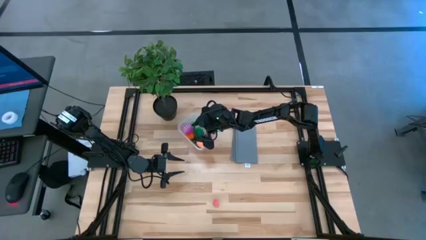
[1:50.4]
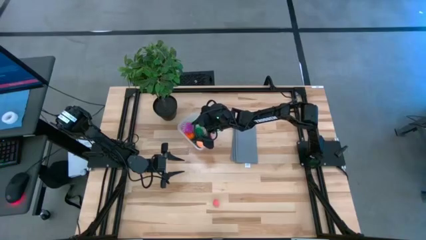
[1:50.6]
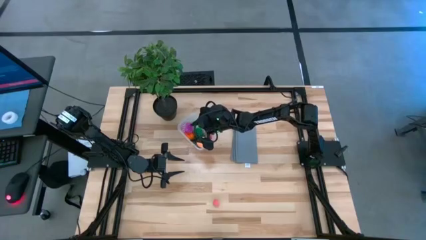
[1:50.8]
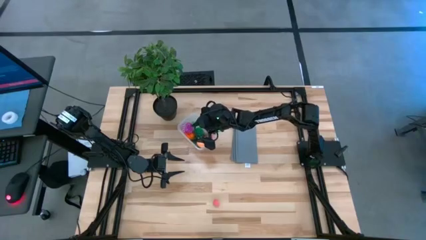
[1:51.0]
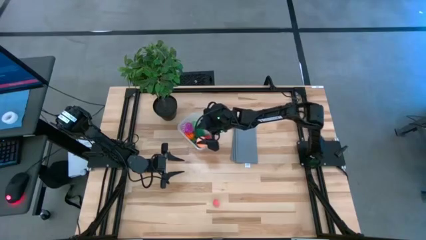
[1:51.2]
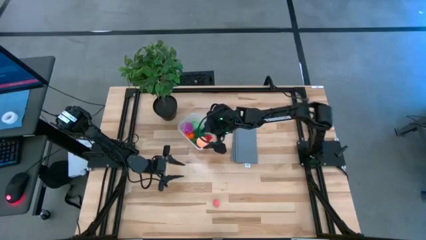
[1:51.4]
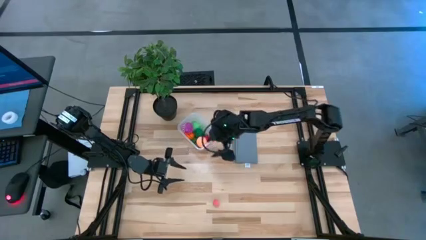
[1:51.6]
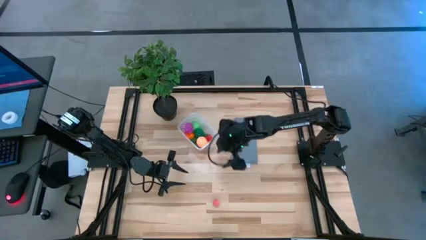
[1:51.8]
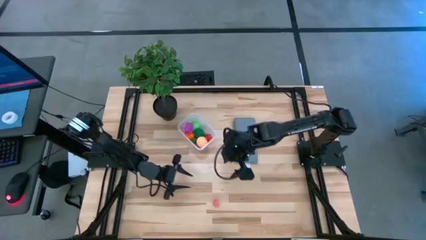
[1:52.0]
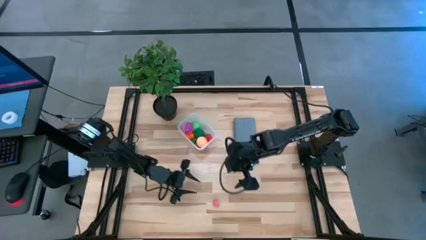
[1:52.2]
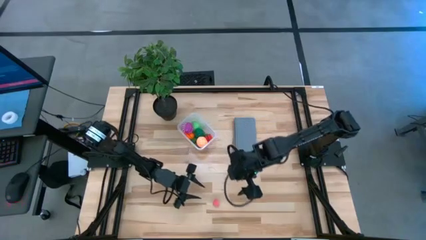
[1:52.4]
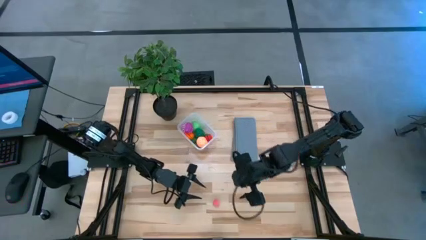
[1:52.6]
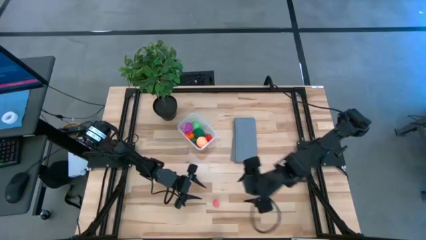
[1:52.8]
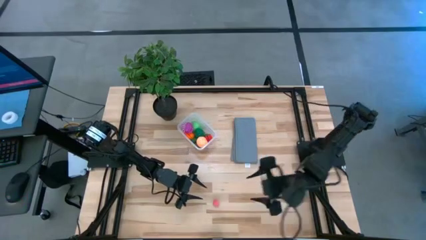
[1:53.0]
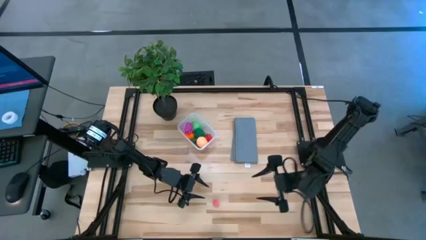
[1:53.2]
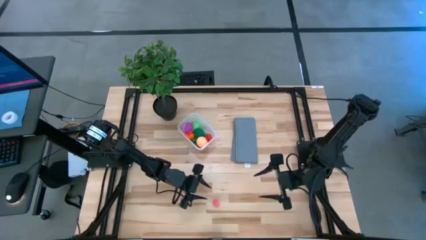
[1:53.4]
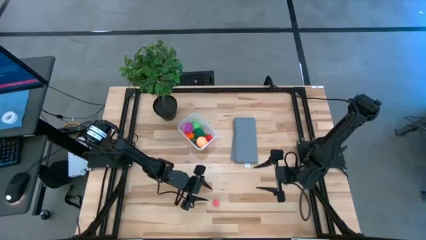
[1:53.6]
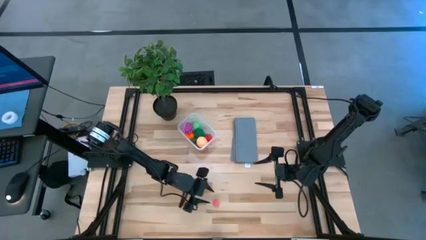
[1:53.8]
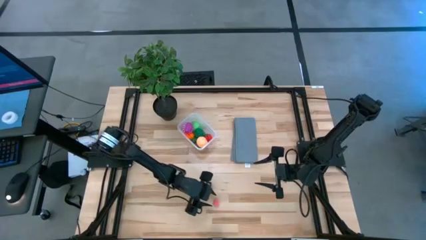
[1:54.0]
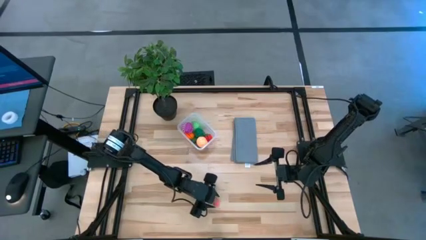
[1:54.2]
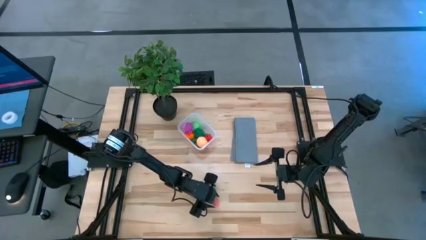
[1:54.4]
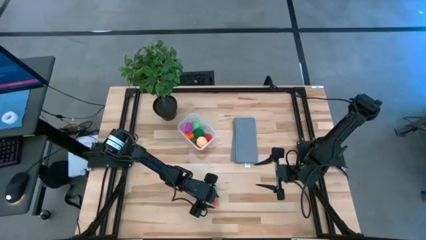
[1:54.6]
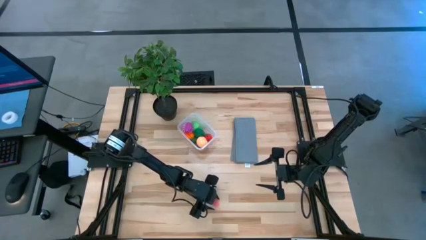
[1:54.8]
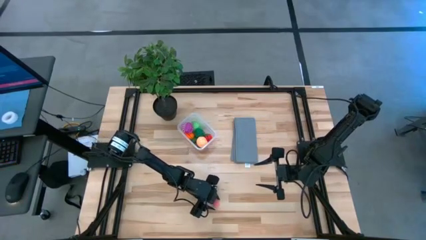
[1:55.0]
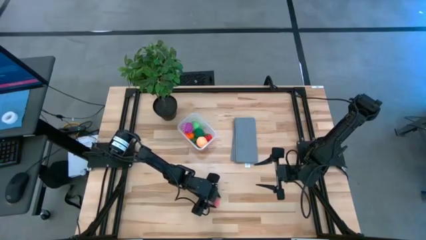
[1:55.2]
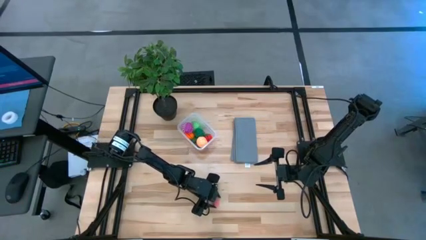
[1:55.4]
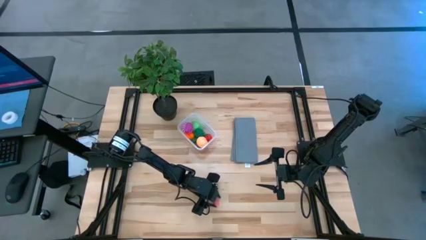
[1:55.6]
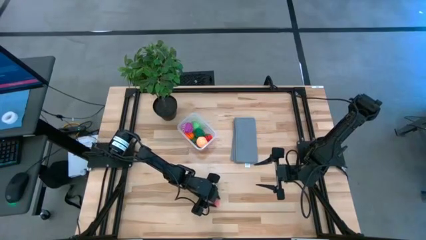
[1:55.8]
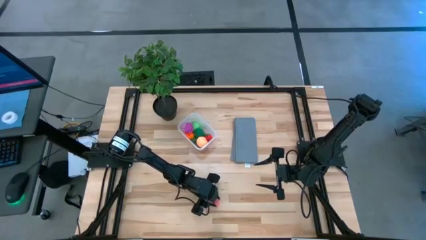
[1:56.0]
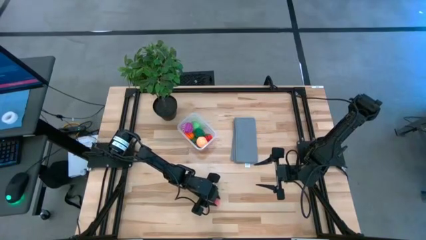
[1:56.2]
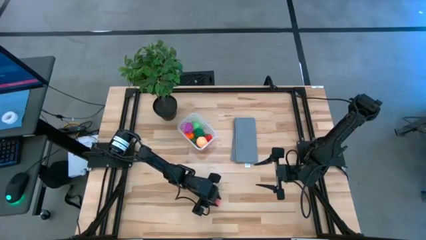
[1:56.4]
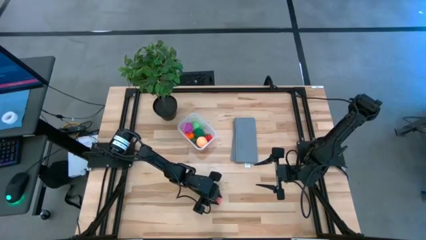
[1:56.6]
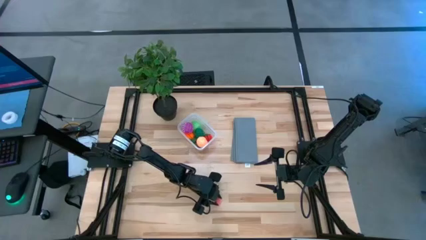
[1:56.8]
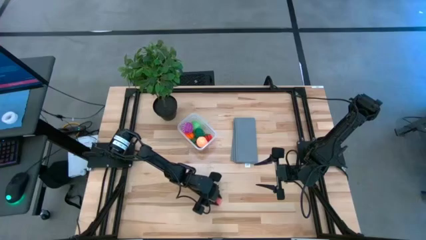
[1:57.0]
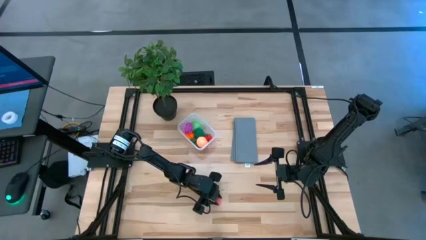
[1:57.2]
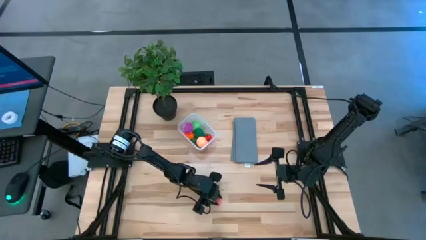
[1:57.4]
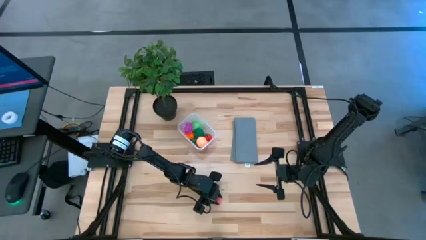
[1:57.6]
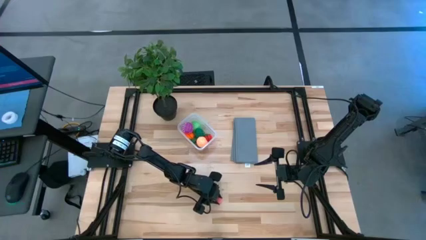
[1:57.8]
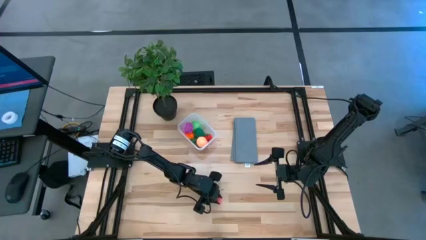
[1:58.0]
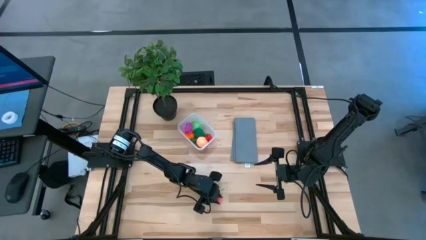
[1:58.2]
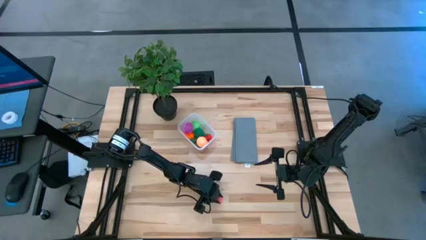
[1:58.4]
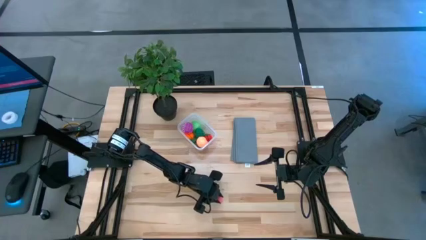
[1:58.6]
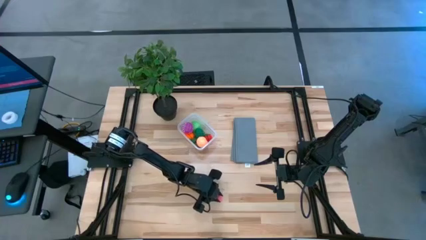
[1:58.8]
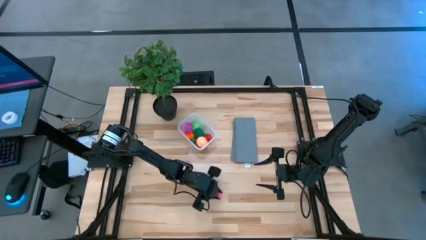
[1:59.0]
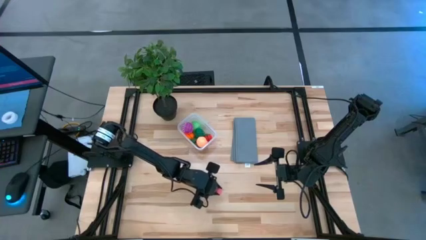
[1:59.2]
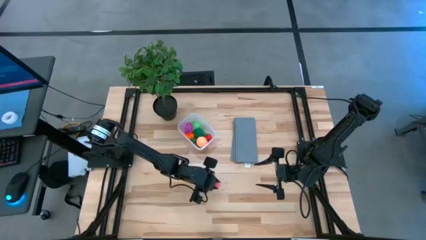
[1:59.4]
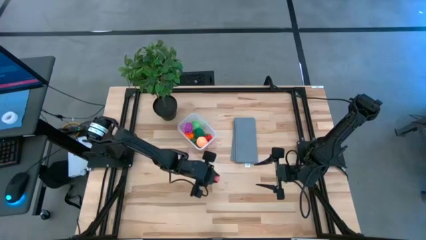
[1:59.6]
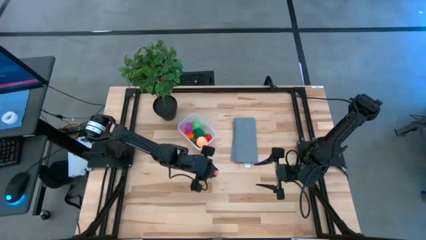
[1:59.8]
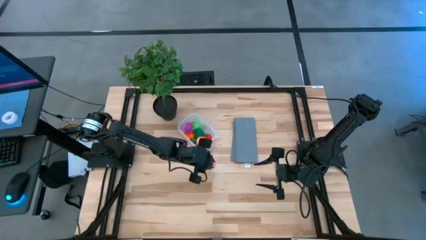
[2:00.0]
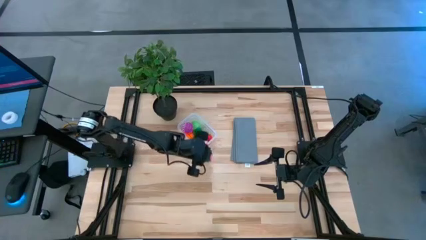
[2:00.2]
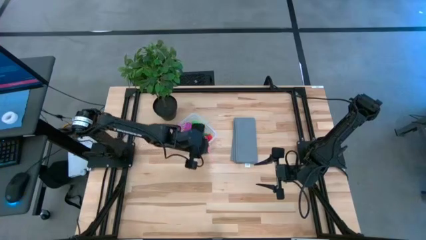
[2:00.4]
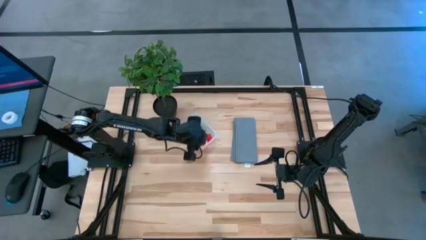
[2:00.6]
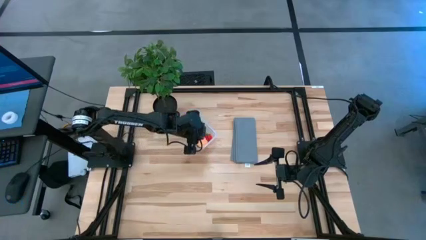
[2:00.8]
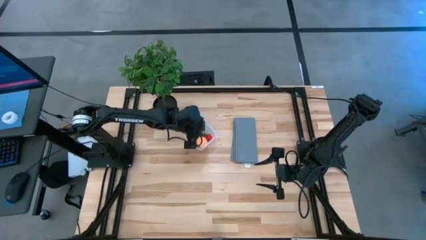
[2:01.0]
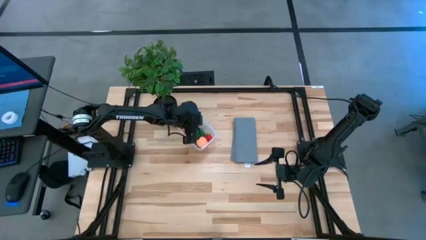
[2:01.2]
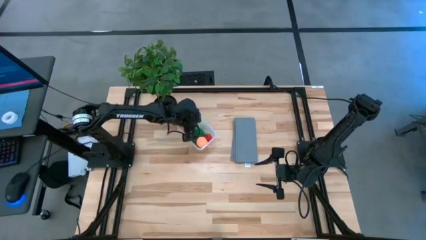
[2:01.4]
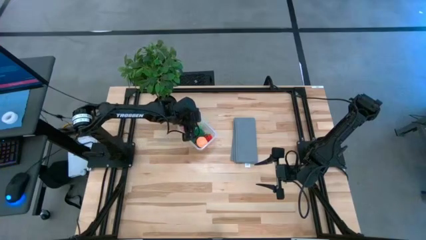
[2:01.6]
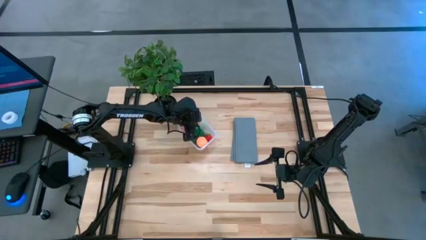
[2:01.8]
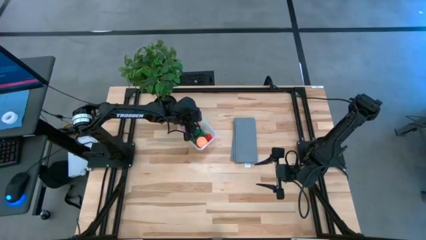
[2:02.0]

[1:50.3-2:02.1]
Task: Pick and placing Produce into tupperware
Put the pink peach into the transparent bin

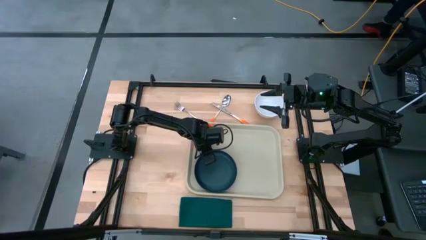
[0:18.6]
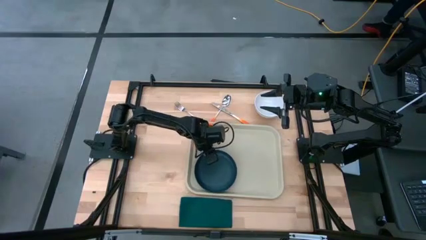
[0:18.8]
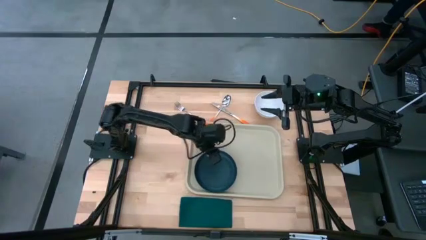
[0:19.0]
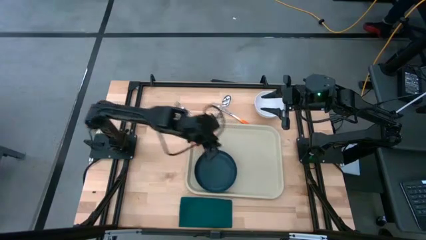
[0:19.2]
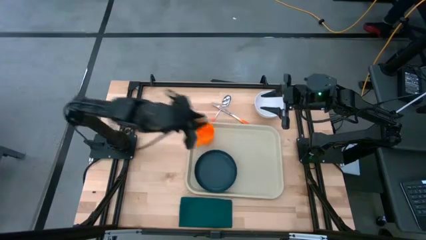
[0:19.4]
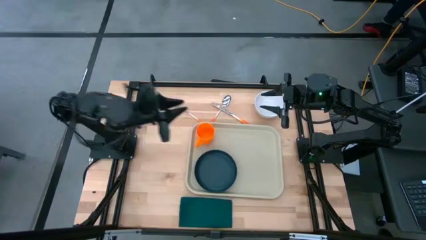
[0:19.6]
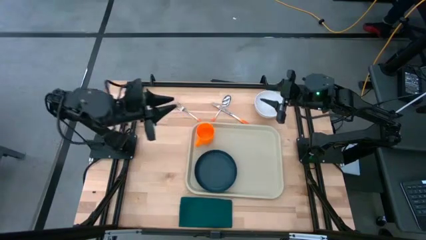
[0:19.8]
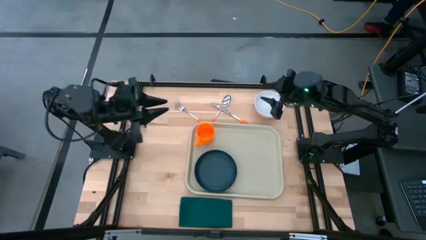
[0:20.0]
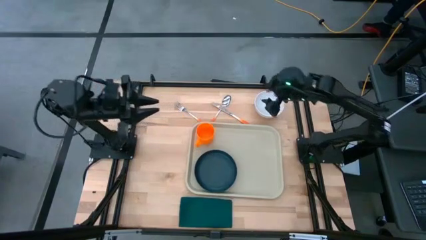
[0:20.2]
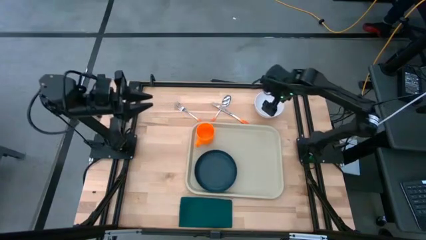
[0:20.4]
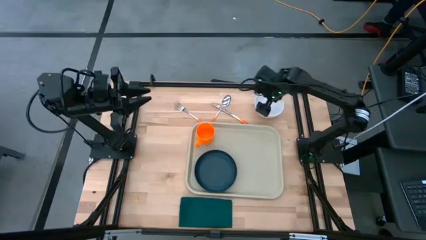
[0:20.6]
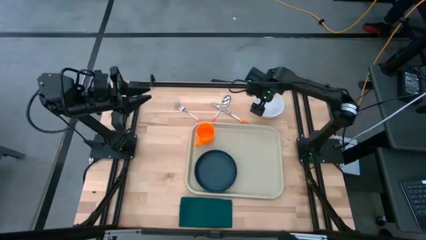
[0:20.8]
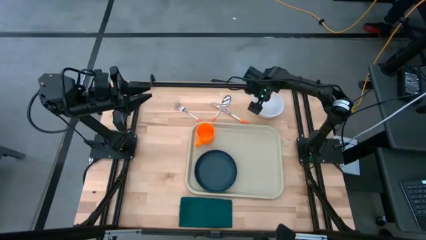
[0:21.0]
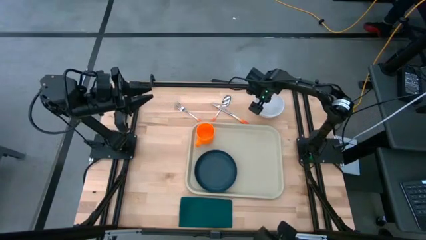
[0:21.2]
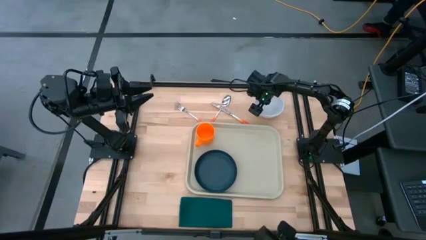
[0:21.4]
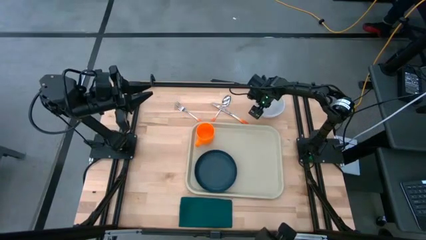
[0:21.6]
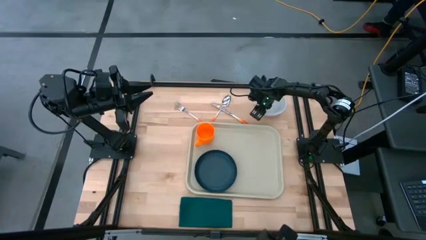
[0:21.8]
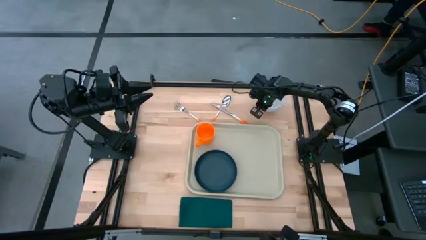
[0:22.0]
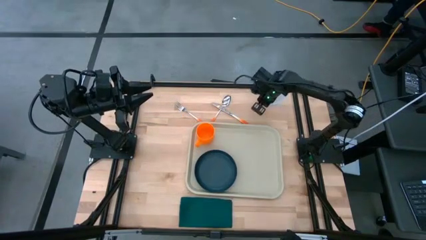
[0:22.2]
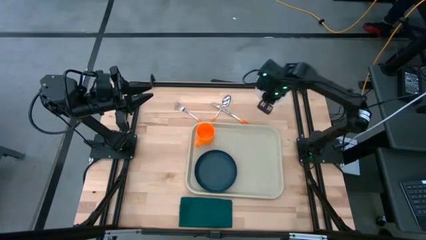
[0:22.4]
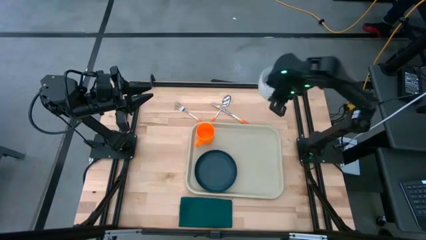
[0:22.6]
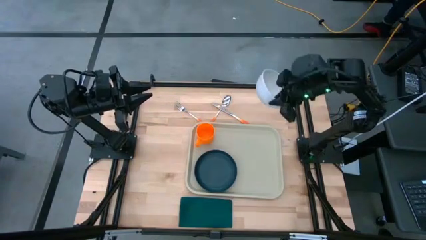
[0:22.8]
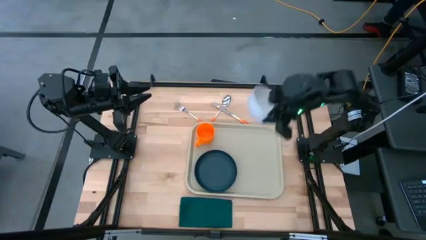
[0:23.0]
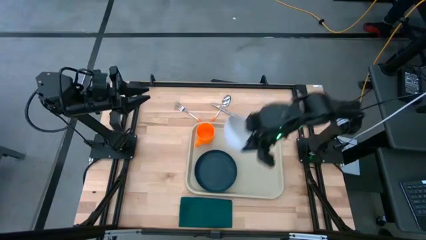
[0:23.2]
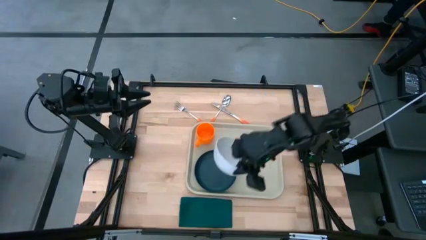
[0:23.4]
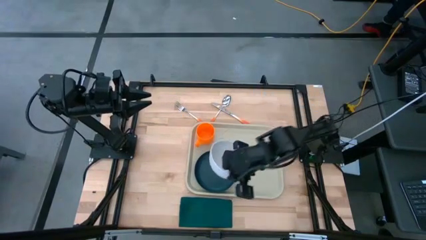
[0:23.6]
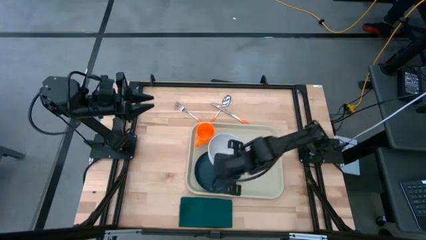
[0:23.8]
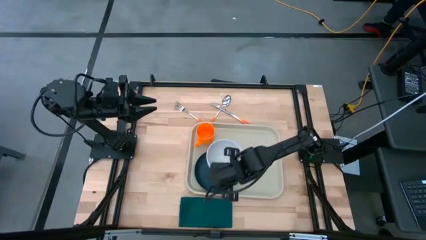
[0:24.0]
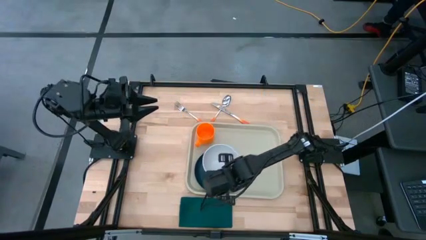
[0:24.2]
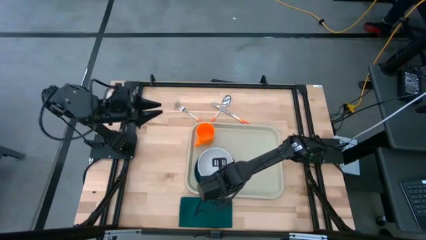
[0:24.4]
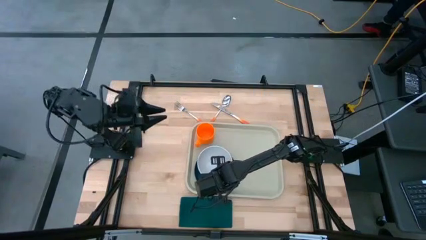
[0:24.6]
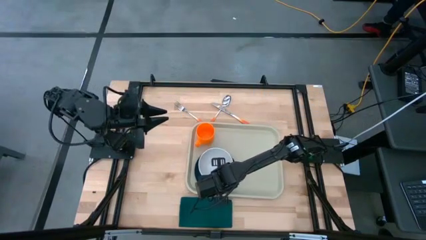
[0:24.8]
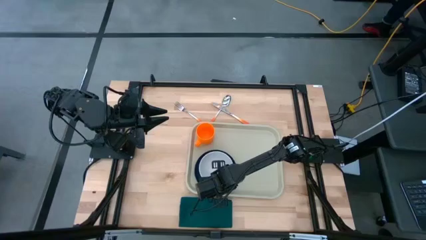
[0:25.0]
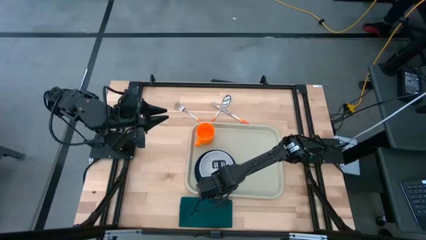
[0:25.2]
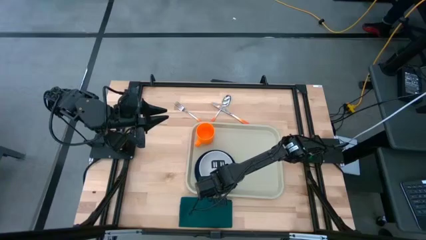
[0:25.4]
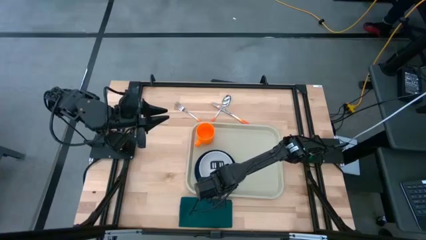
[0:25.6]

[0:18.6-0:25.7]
Task: Set up tray
Put the white bowl on top of the black plate
